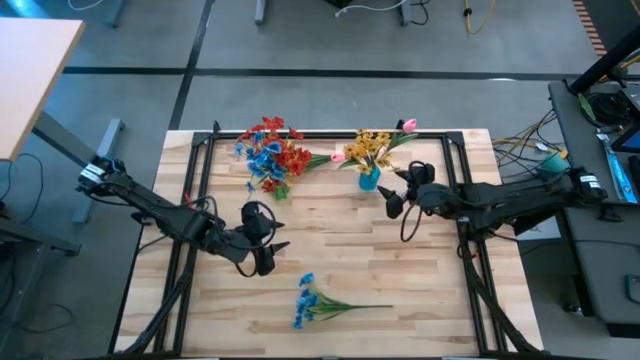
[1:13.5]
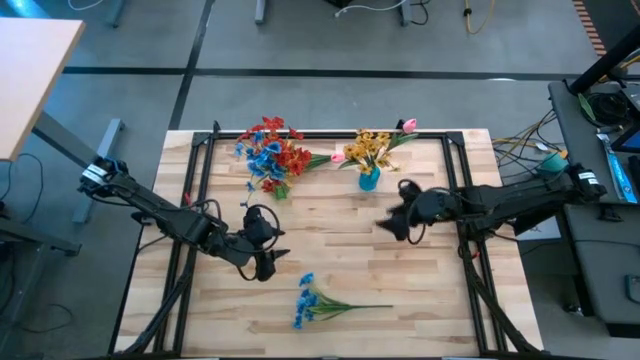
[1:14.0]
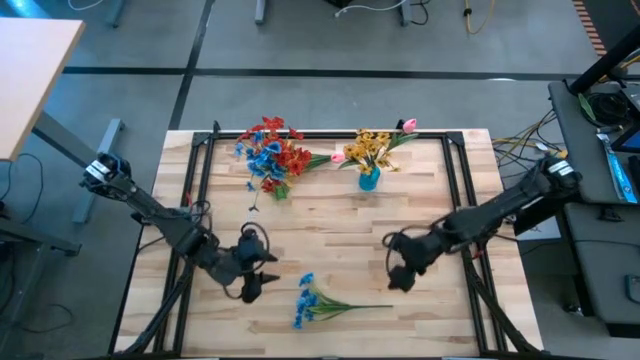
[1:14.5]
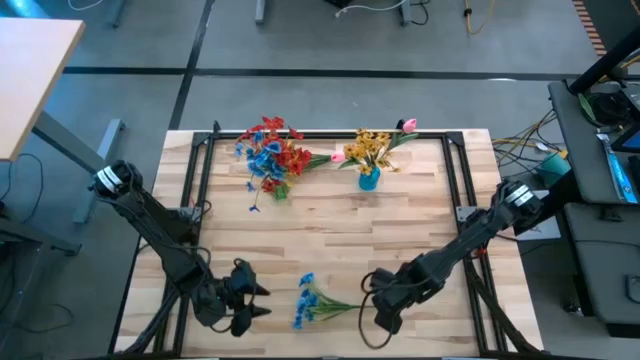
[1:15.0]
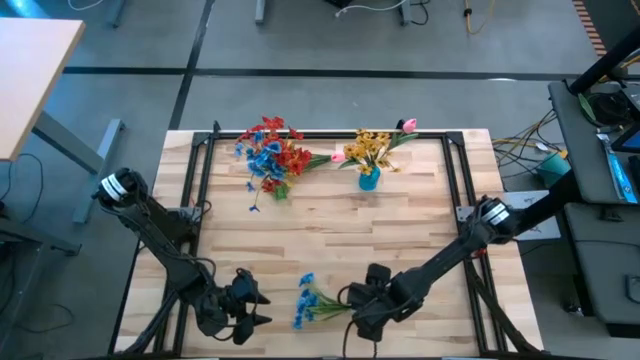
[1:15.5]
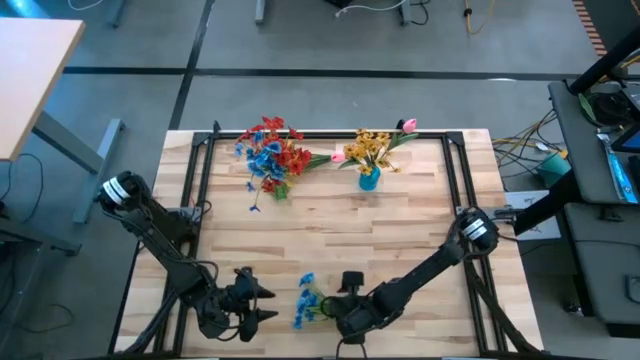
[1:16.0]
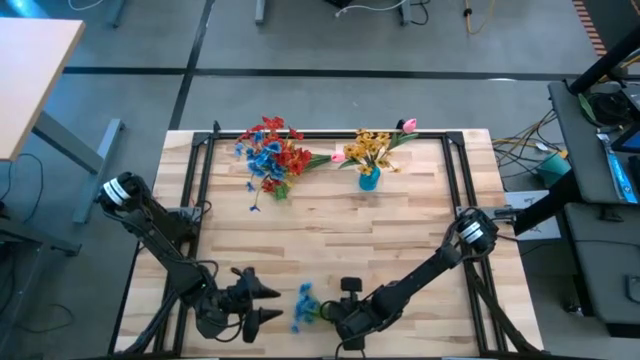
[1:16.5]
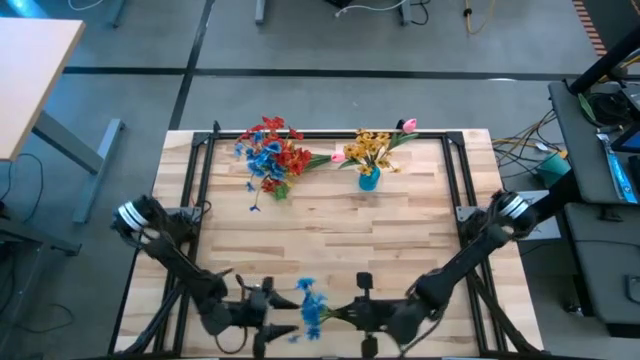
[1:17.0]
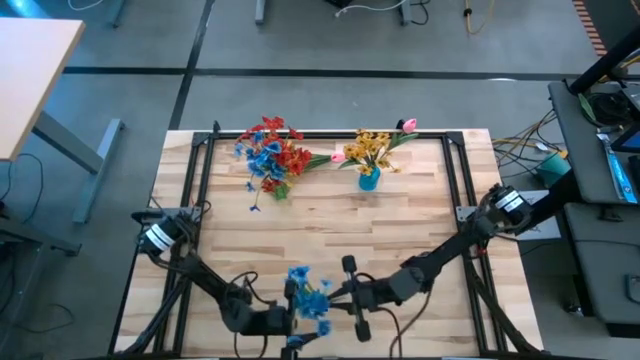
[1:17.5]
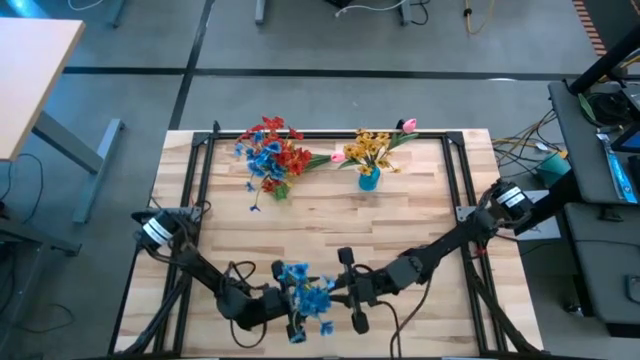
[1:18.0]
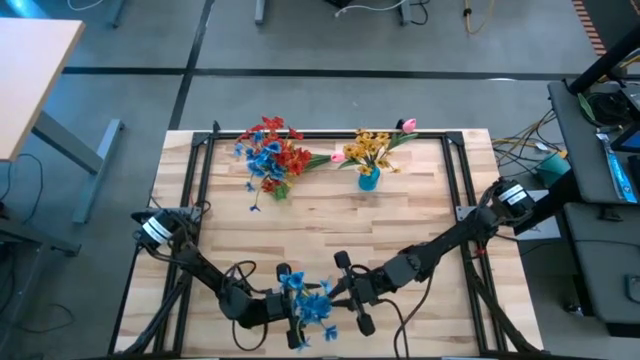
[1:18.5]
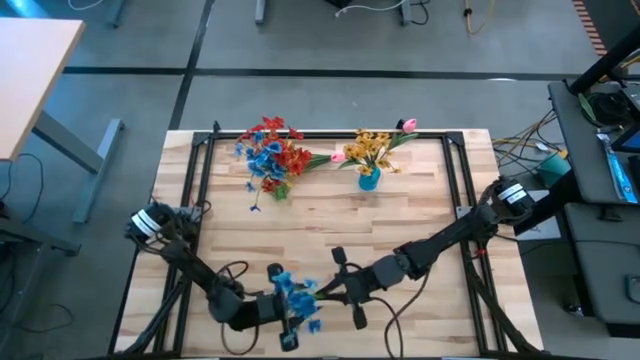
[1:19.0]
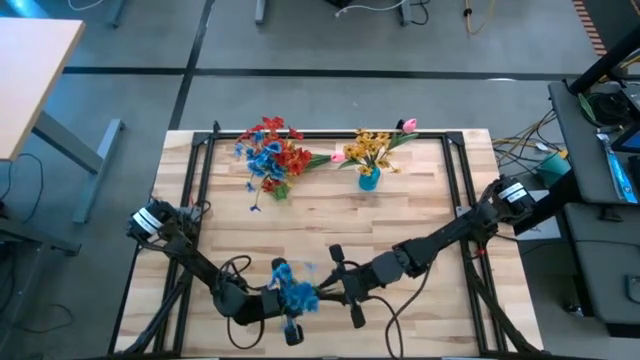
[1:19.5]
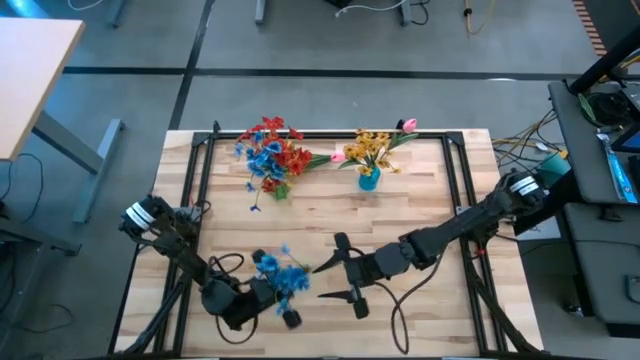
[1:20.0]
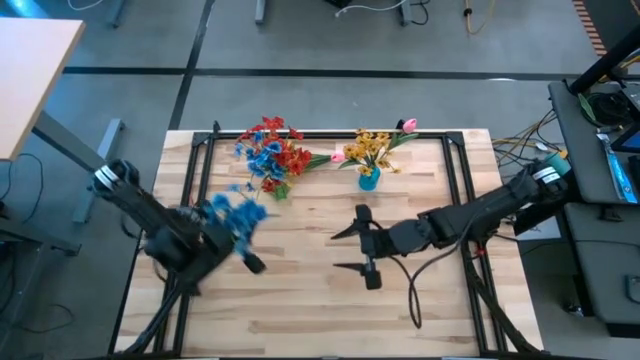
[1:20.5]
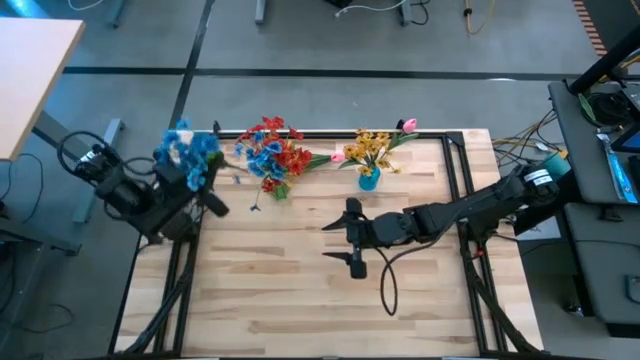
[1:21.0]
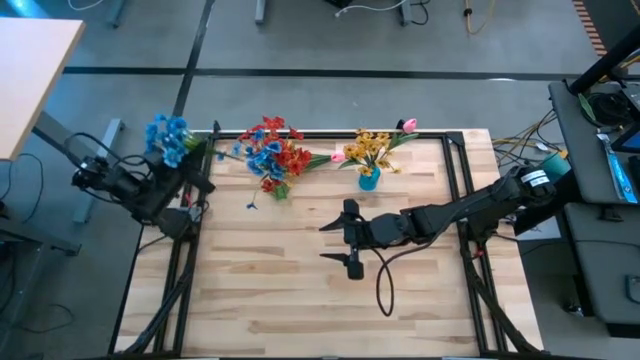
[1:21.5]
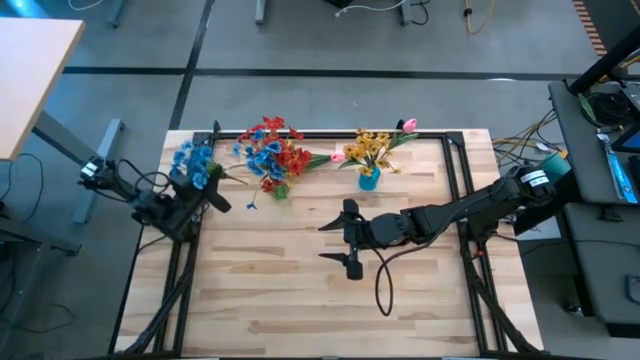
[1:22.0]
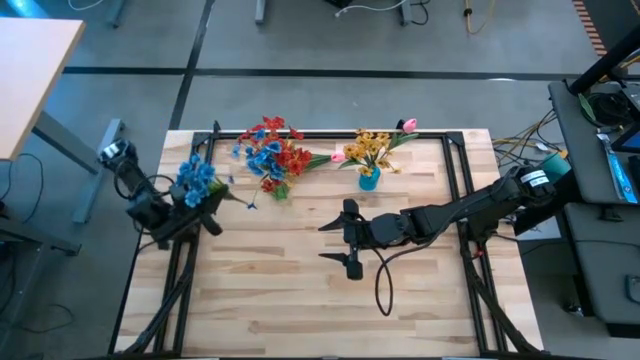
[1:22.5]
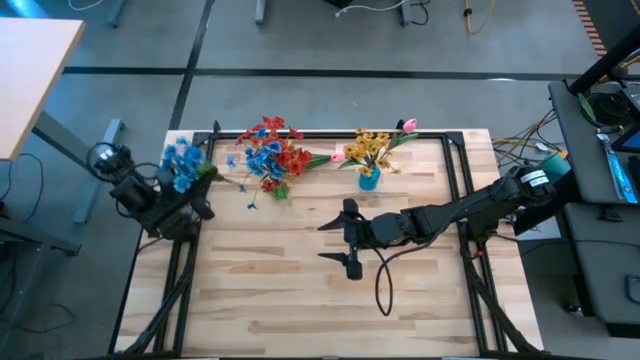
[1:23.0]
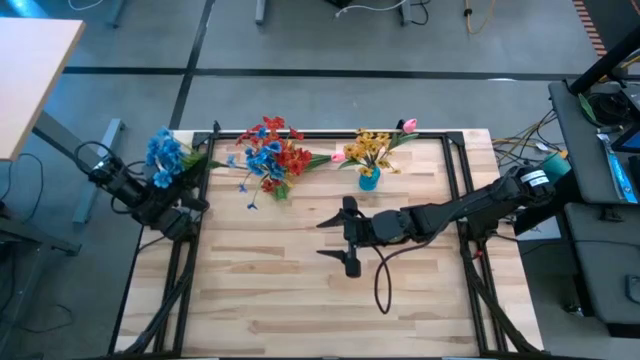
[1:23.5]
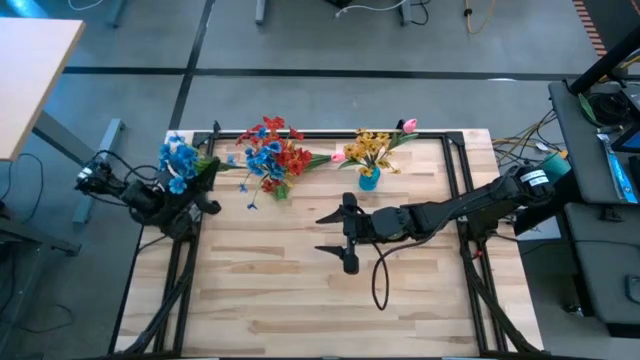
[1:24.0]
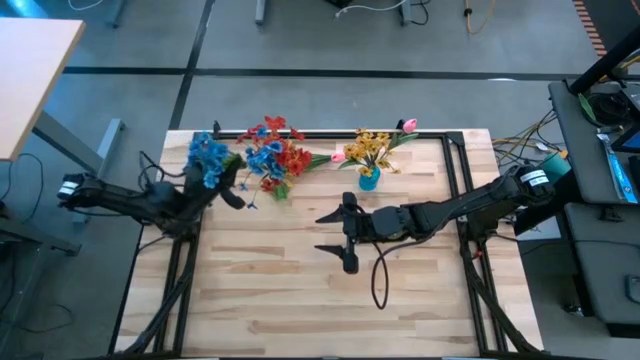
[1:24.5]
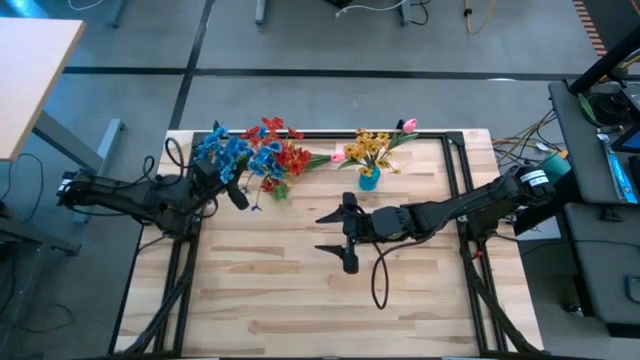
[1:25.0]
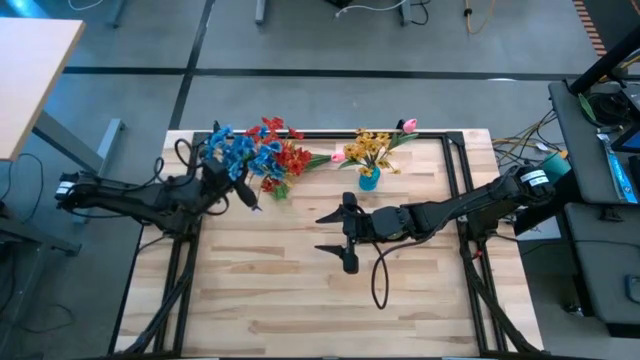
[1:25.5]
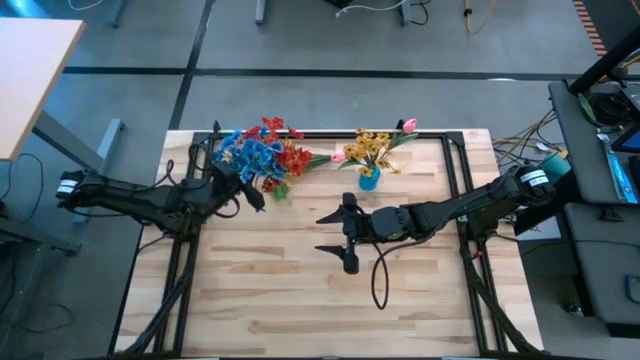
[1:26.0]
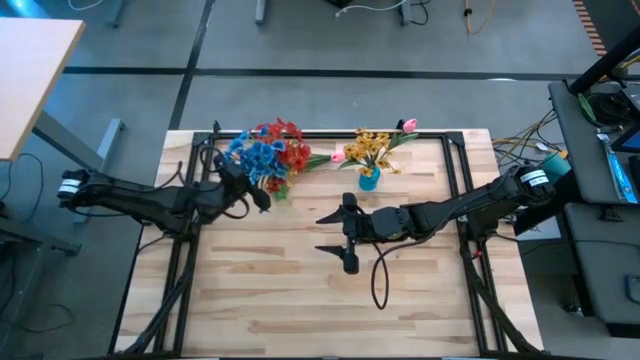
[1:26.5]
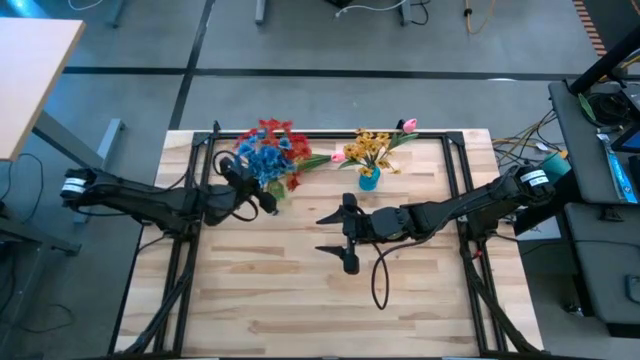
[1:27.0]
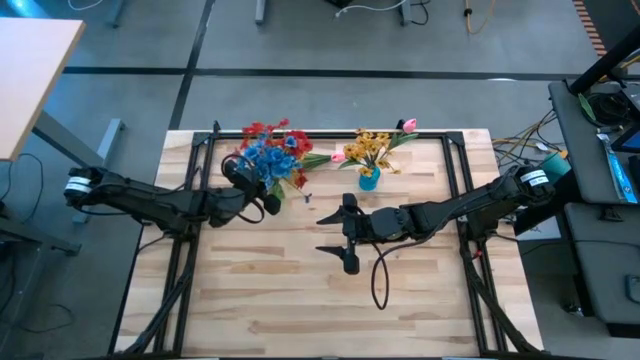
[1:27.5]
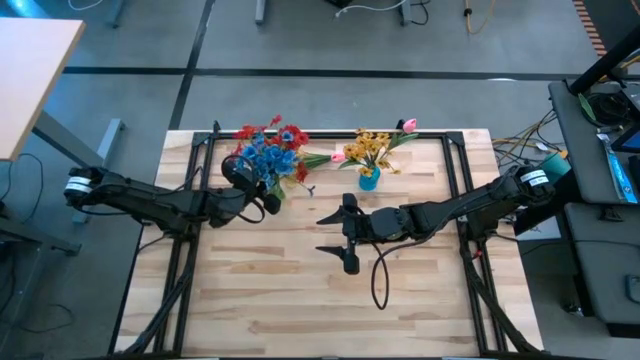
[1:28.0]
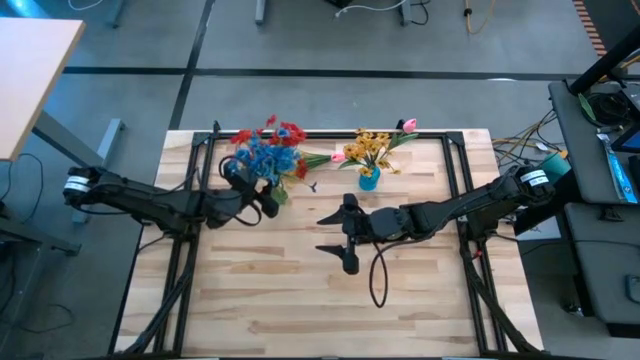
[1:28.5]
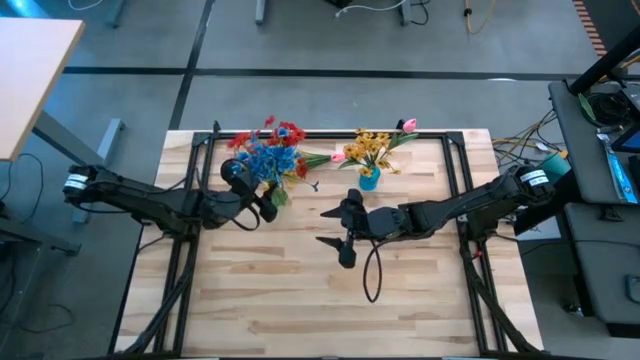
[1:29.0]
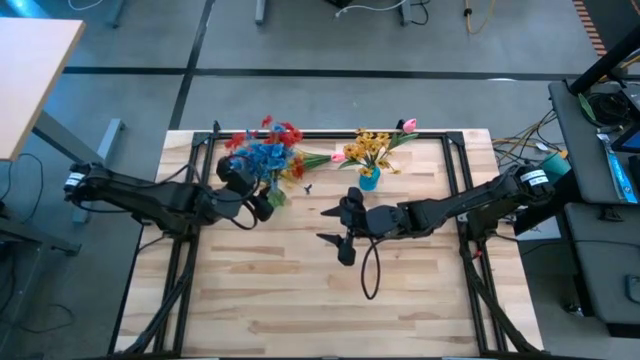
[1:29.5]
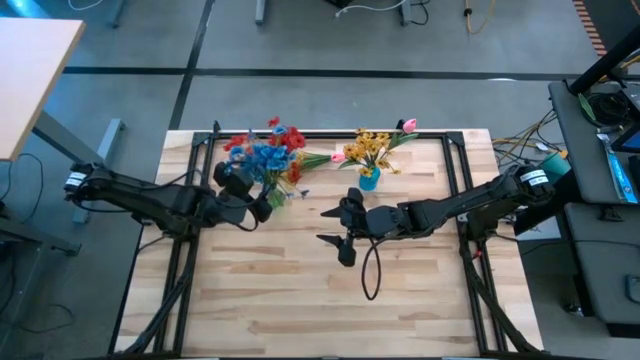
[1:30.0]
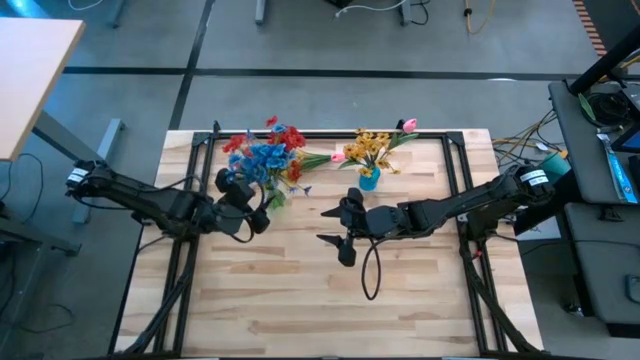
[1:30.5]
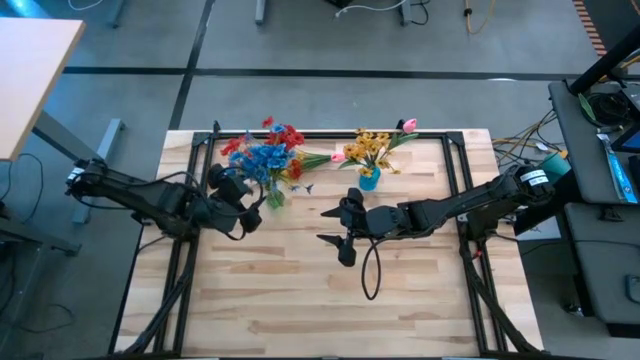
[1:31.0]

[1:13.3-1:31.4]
Task: Sort flowers into vase by color
Put the blue flowers into the green vase

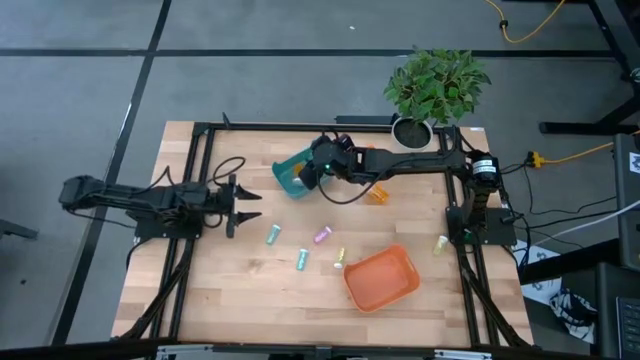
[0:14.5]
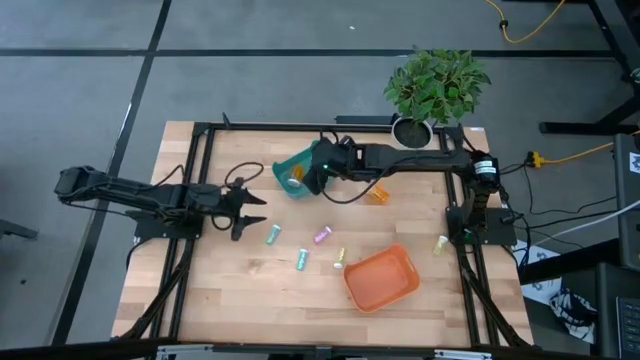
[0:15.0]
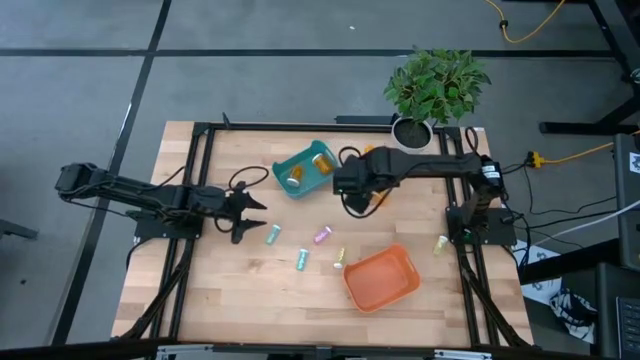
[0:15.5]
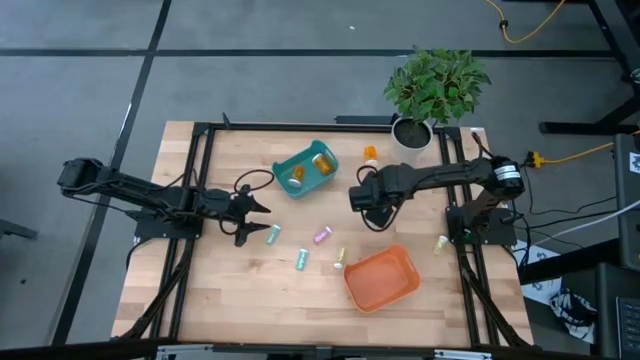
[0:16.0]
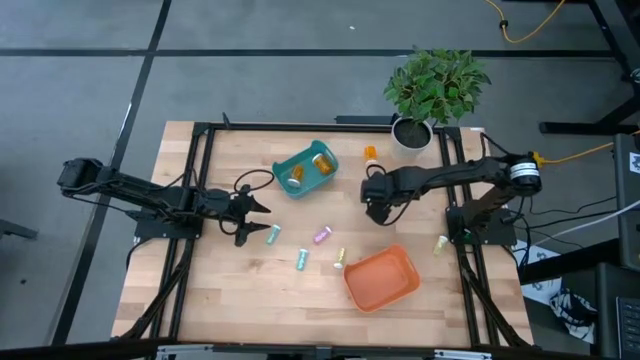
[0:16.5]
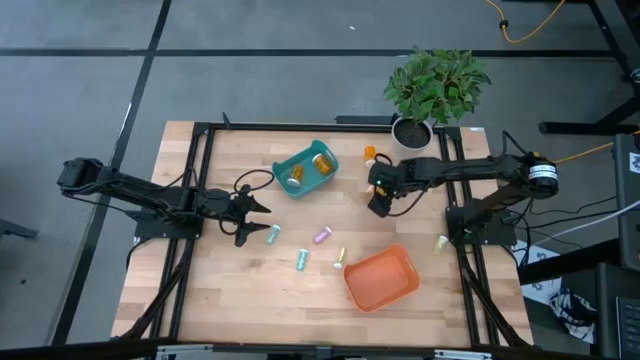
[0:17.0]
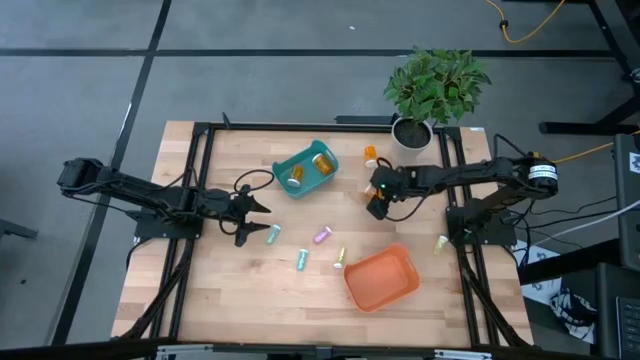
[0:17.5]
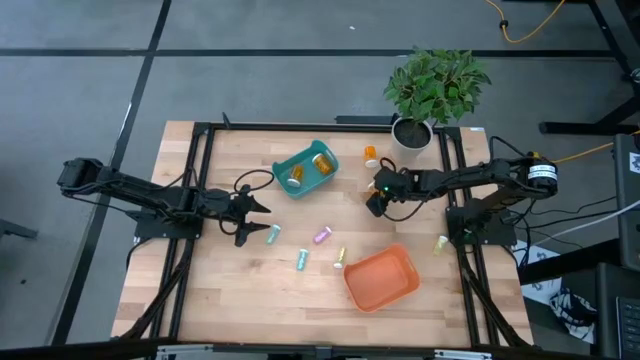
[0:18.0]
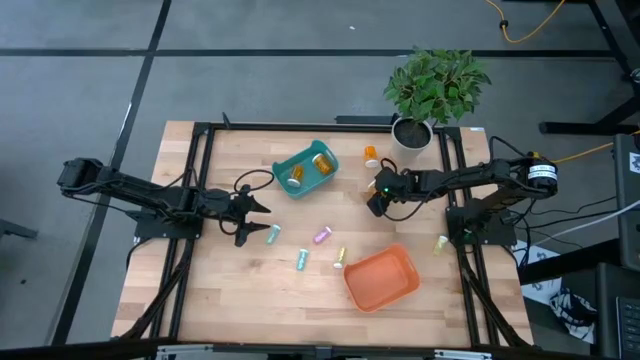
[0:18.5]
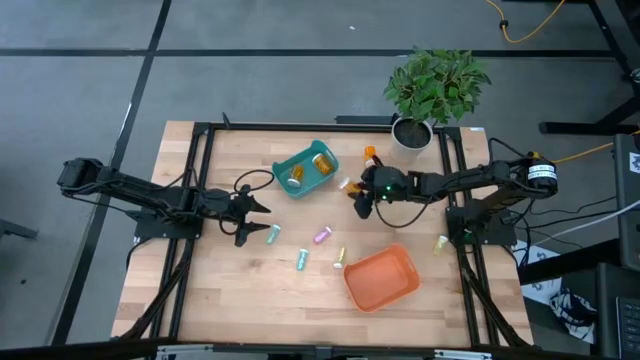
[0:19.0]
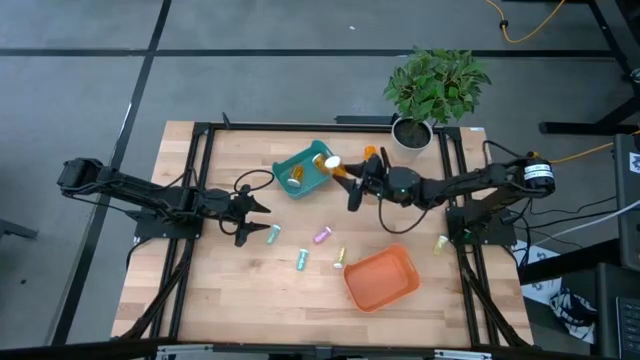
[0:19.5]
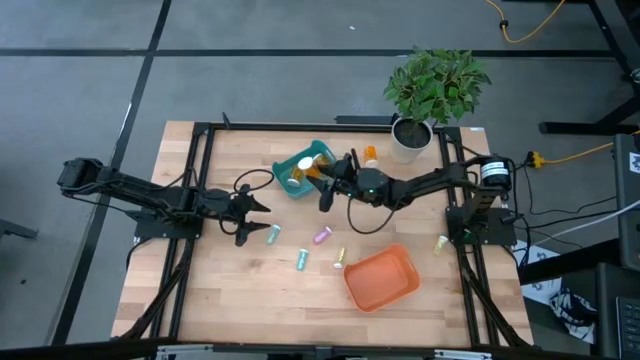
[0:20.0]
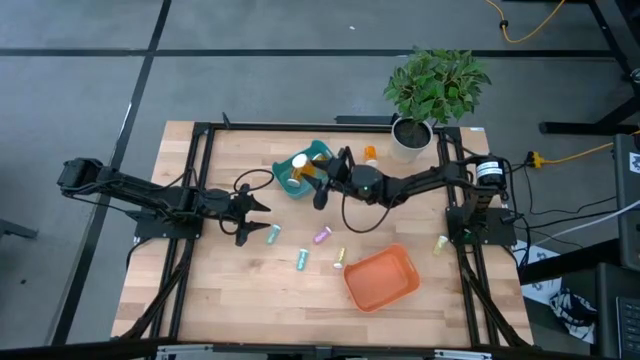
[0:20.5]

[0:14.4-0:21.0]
Task: Pick and place medicine bottles into bin by pill shape (circle, oval)
Put the bottom big orange pill bottle into the light blue bin
